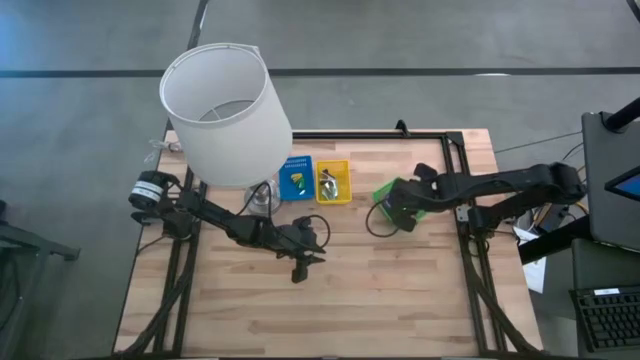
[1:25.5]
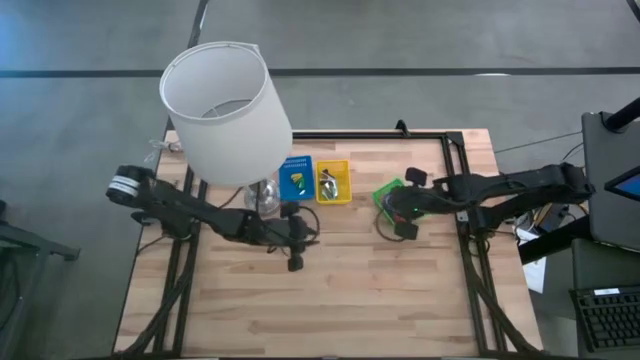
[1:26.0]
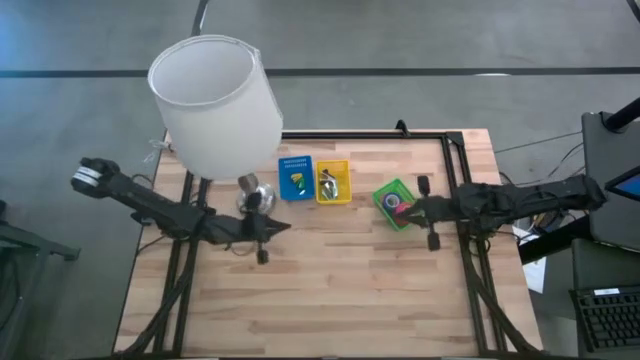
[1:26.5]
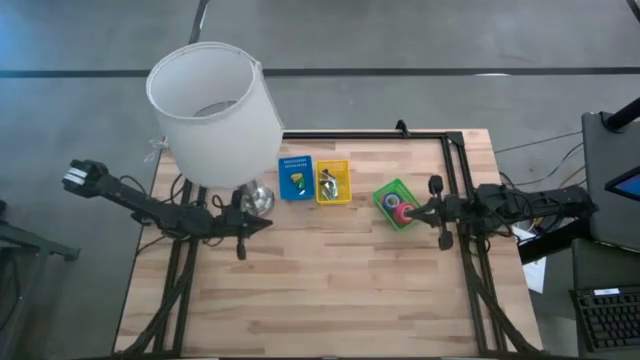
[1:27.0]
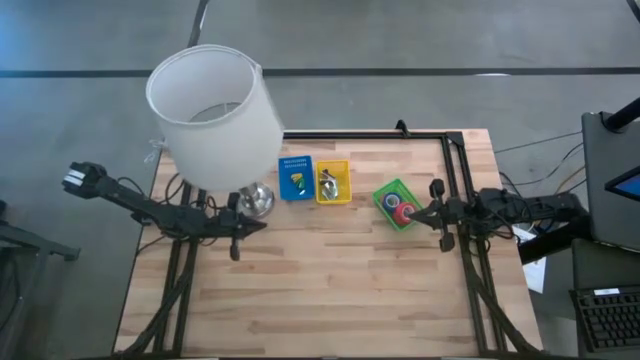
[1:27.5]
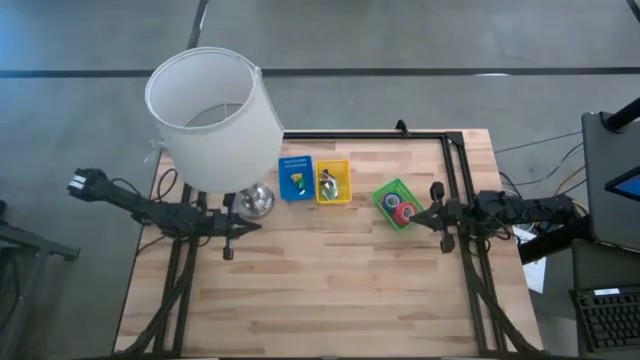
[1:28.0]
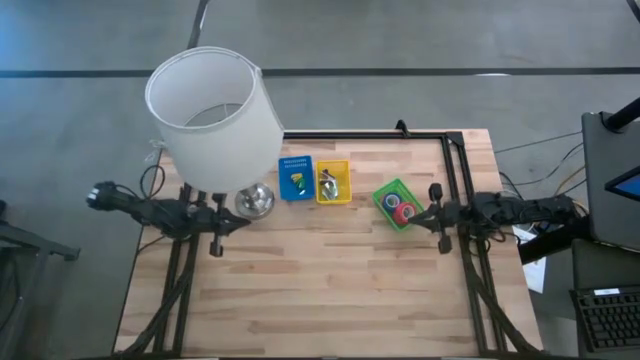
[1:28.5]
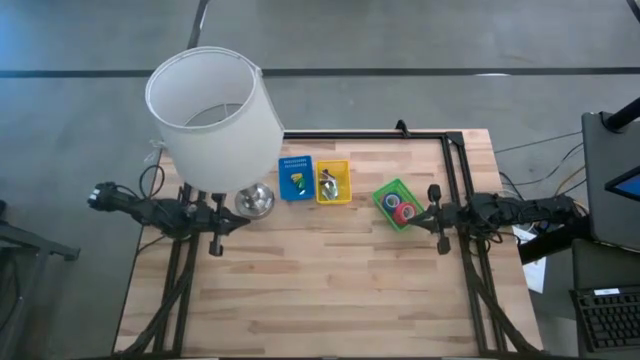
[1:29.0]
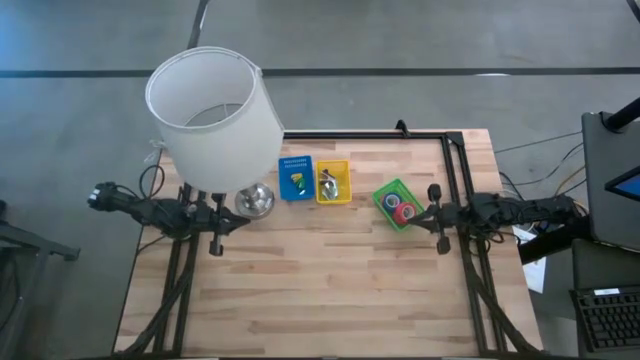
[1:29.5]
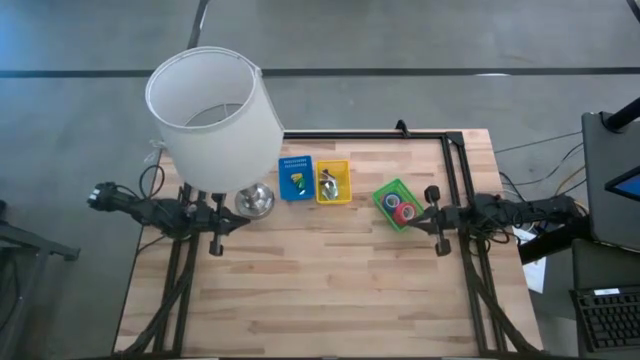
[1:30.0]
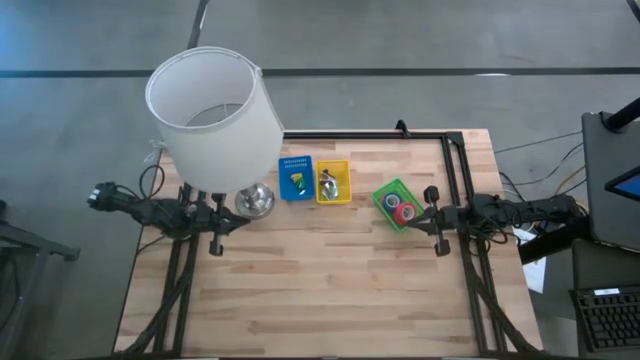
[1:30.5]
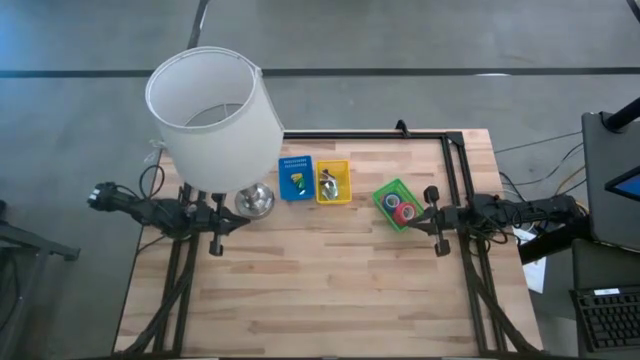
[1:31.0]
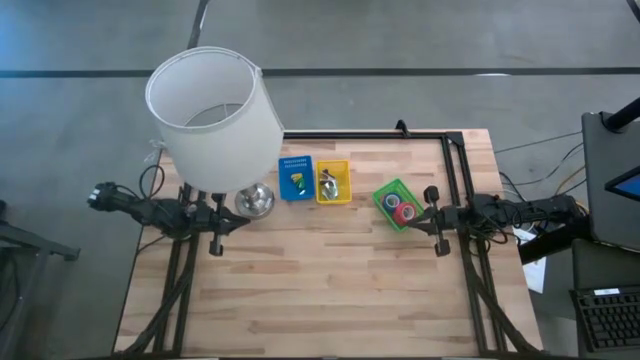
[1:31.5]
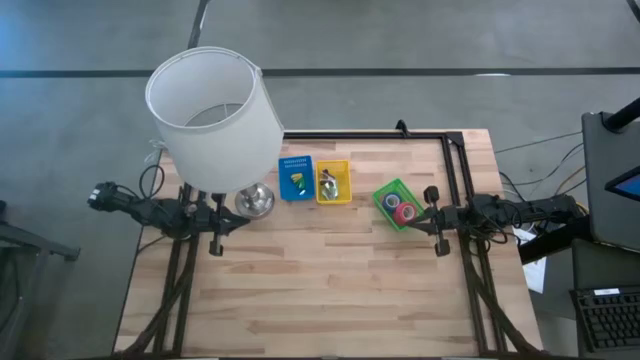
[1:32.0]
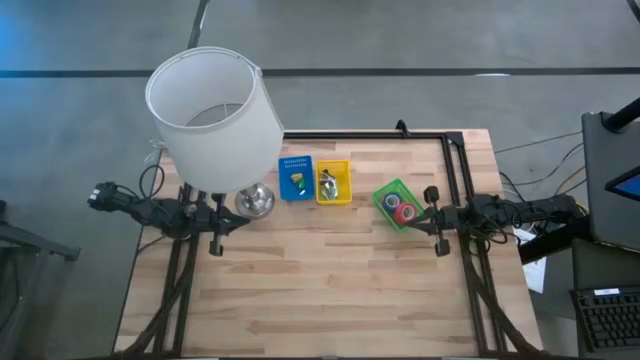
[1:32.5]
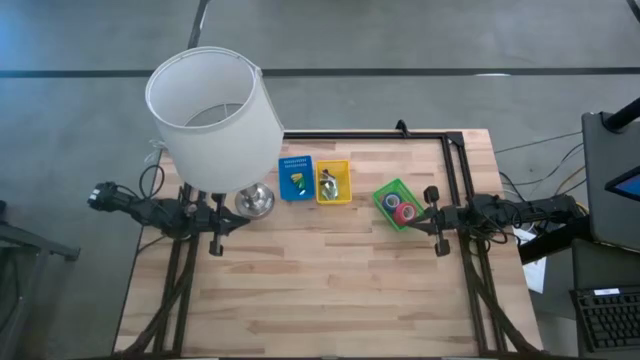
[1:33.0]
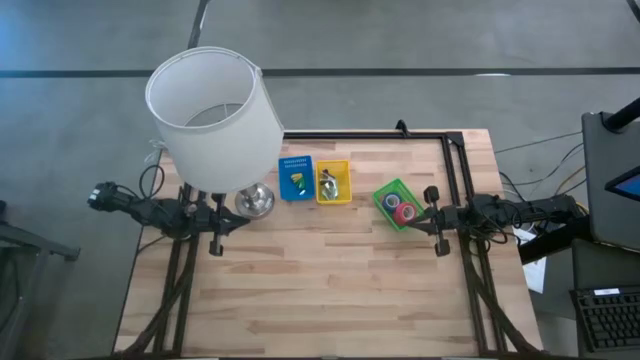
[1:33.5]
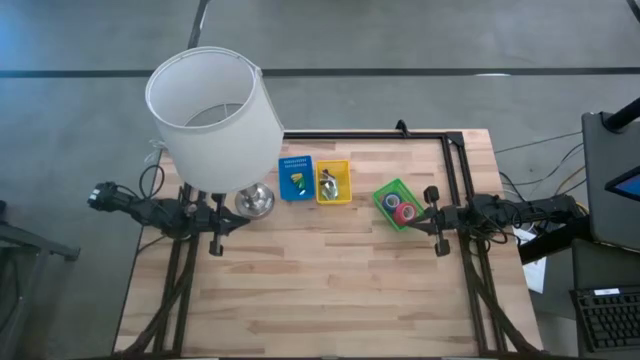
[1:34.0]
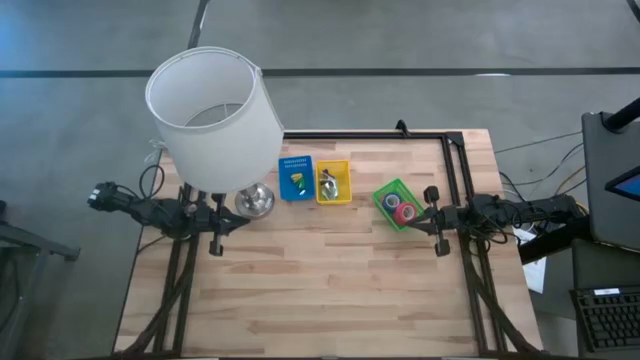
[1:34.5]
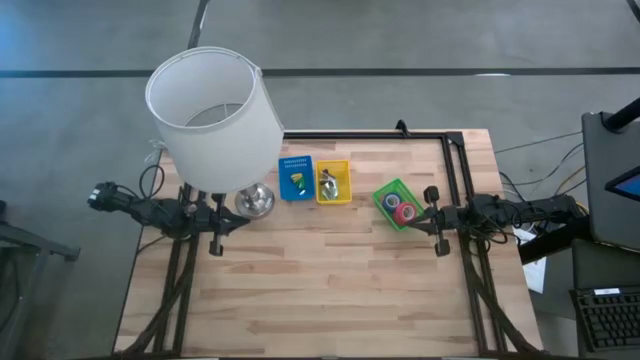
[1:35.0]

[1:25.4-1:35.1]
Task: Pick and place Stapler, Stapler remover, tape
Return to Home Position

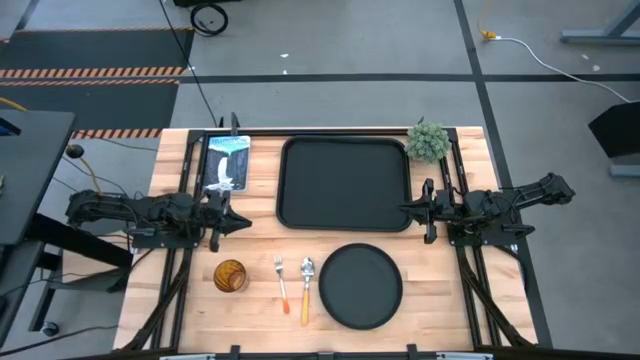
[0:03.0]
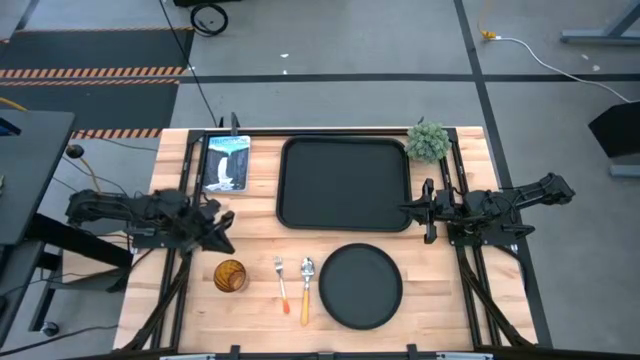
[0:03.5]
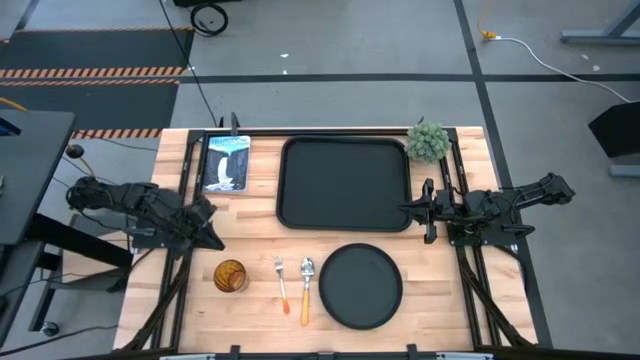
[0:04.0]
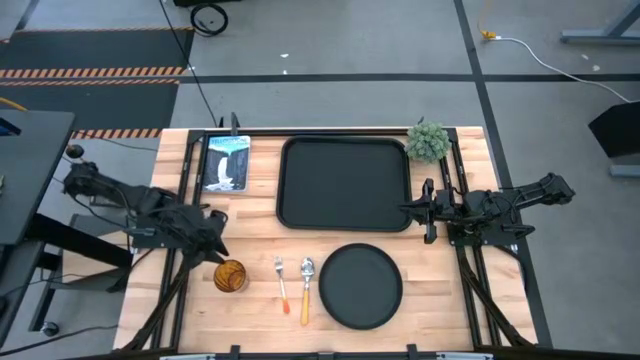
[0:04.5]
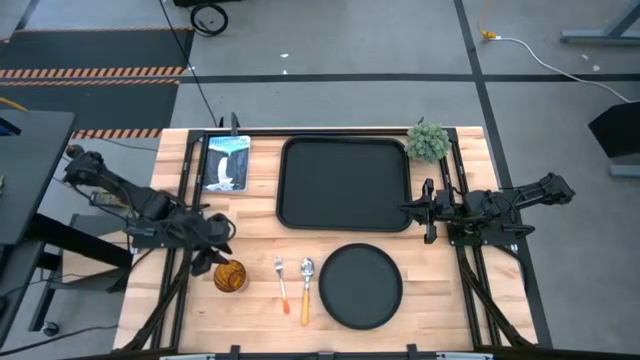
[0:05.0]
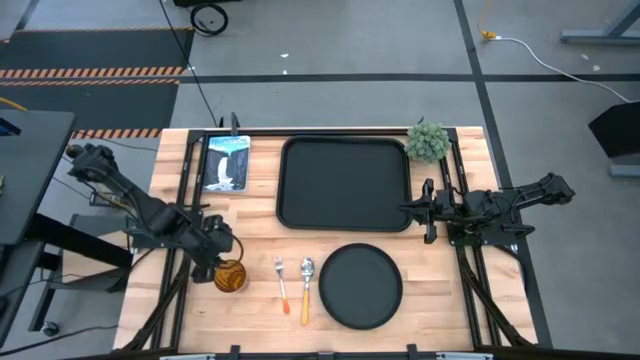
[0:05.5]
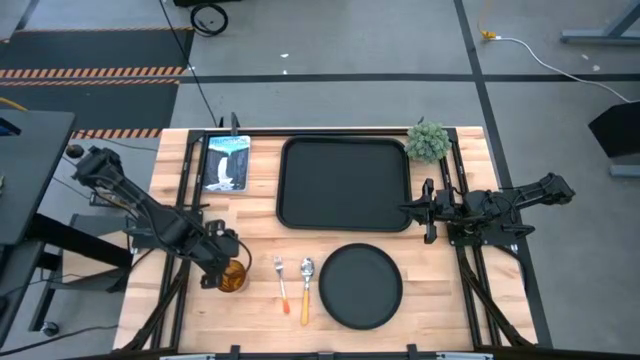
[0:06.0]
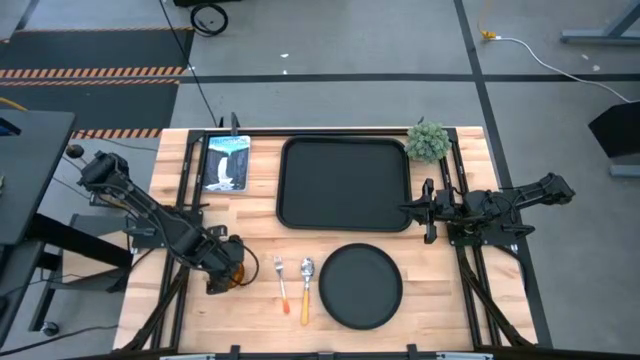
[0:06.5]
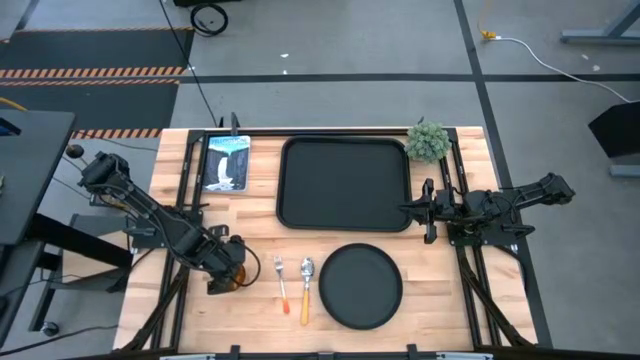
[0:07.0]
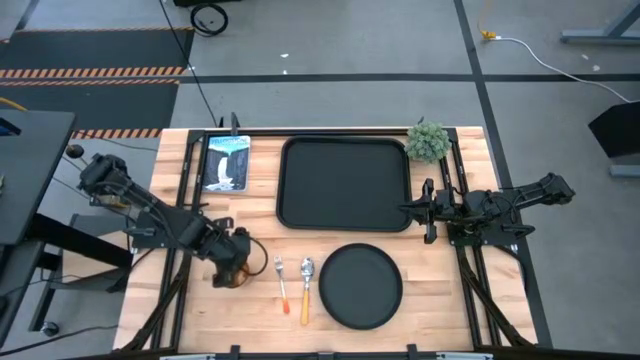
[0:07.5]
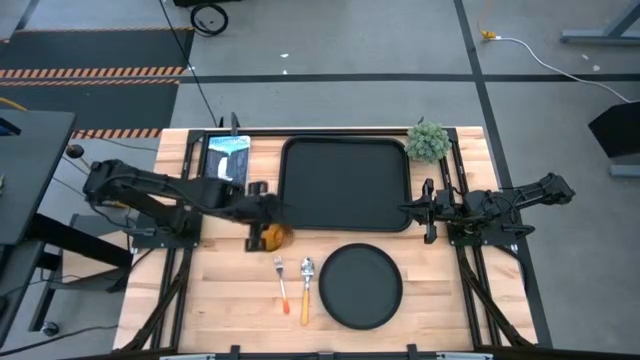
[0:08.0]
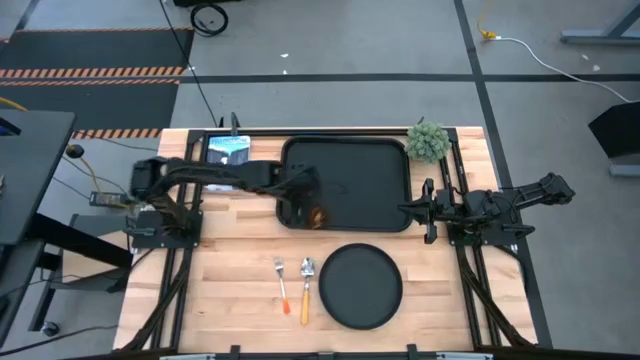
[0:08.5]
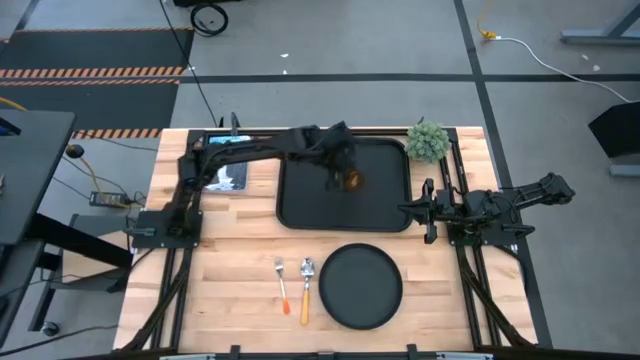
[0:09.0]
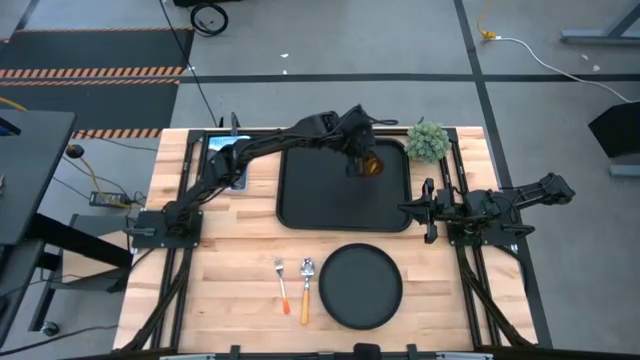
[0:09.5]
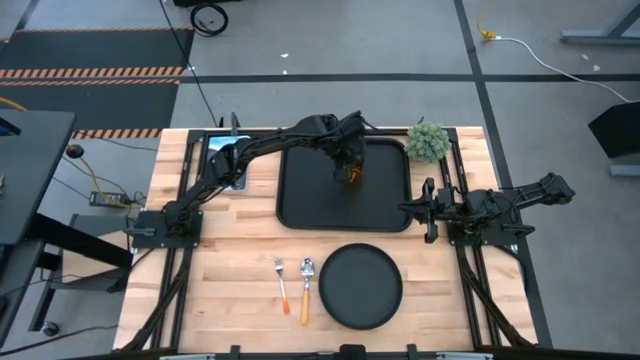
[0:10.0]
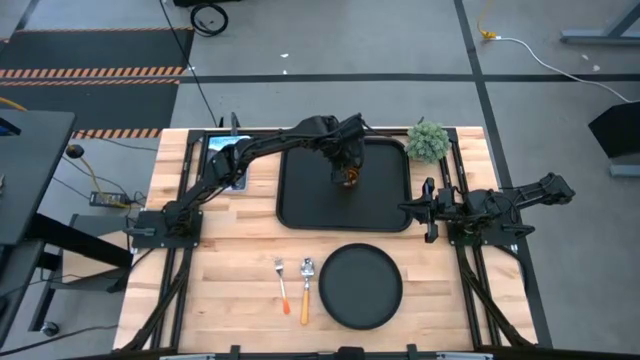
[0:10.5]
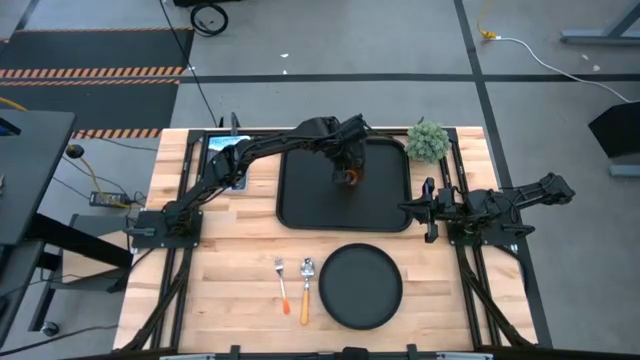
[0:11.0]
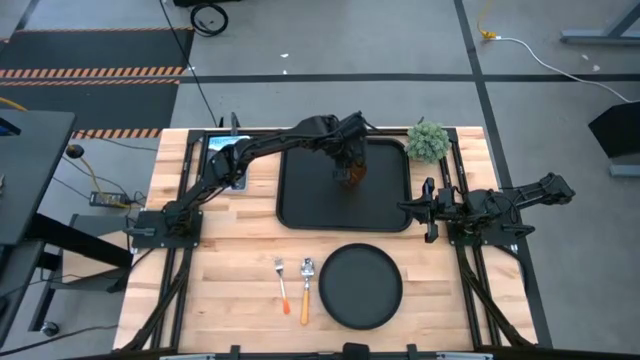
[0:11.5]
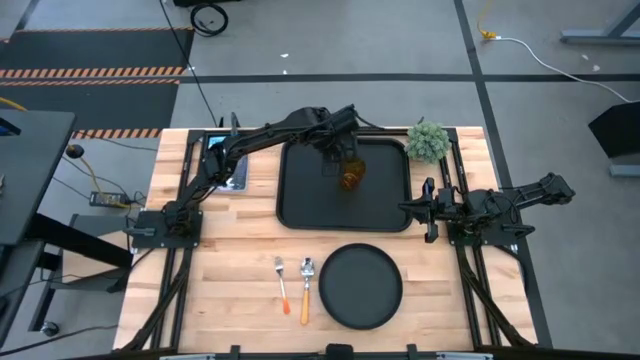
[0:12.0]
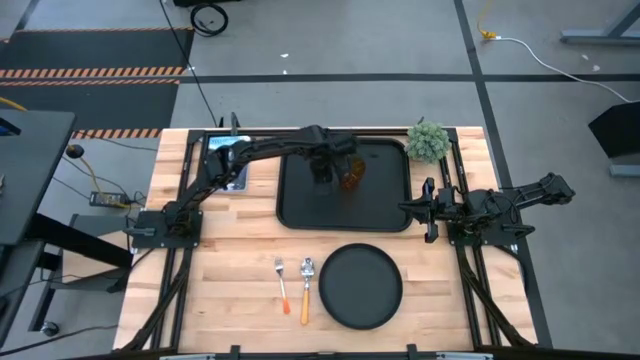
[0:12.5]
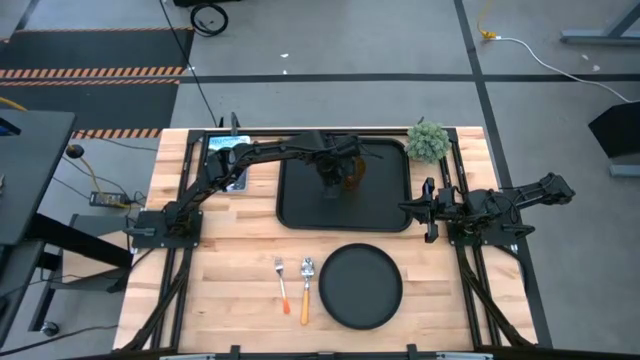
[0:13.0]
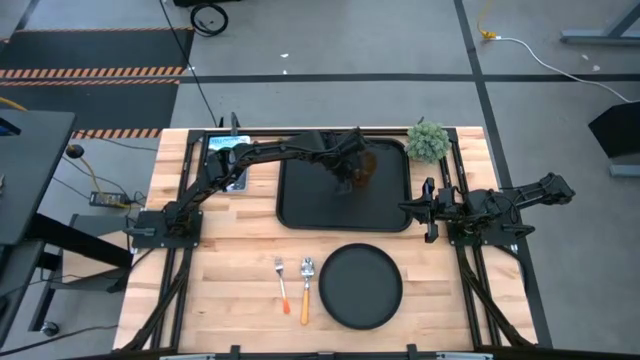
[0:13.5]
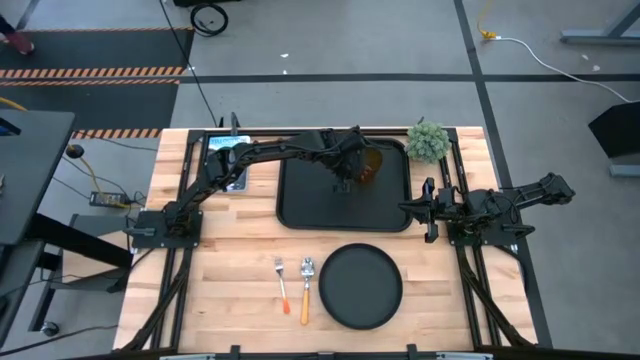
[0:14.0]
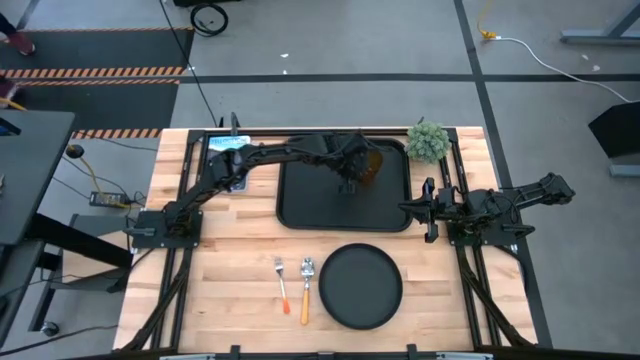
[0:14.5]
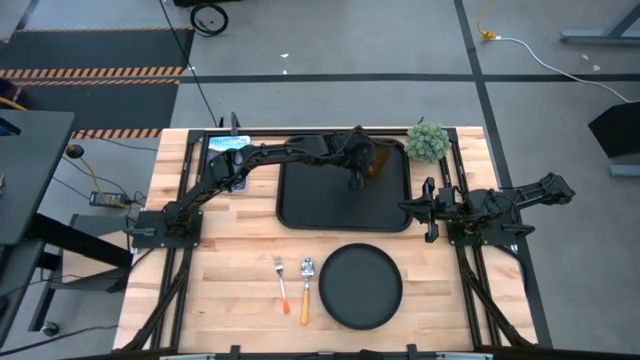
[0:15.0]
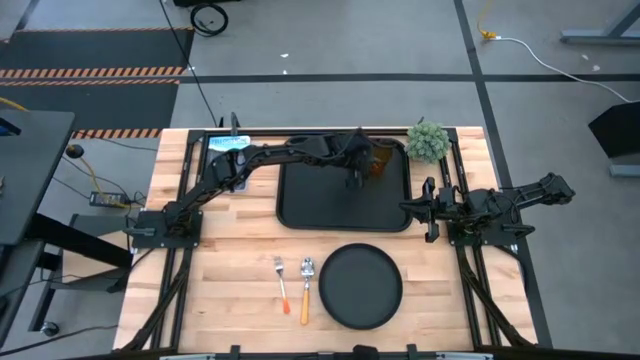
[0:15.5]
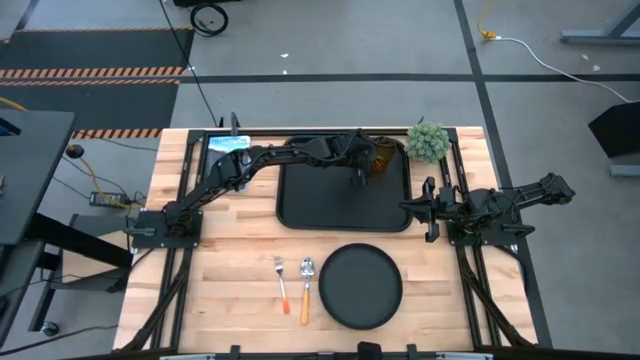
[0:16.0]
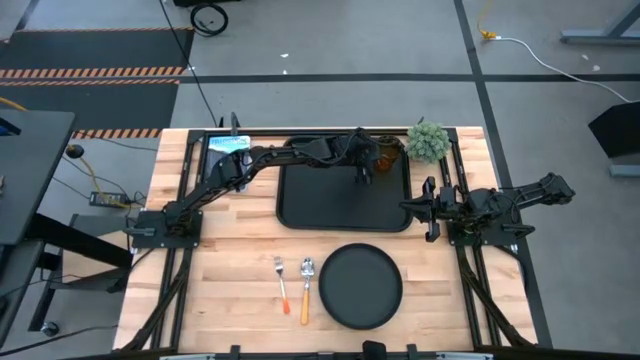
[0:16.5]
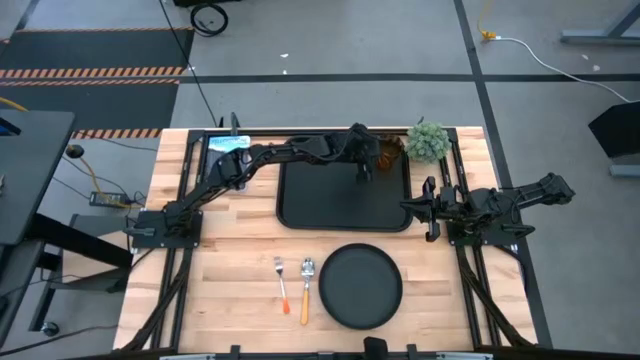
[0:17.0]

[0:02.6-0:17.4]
Task: Pick and place plate/cup/fork/spoon on tray
Put the orange cup on the top right side of the black tray
